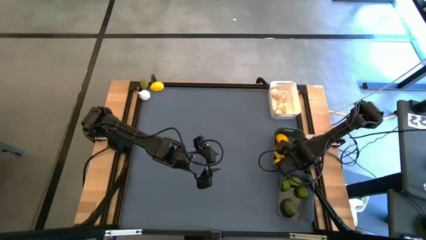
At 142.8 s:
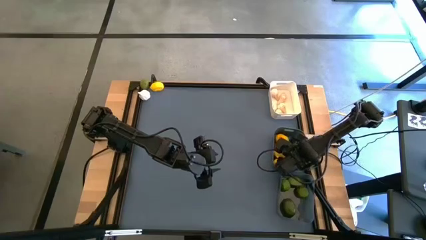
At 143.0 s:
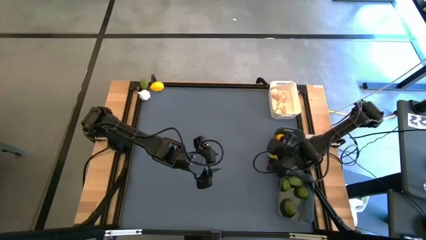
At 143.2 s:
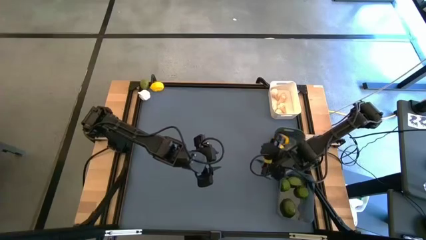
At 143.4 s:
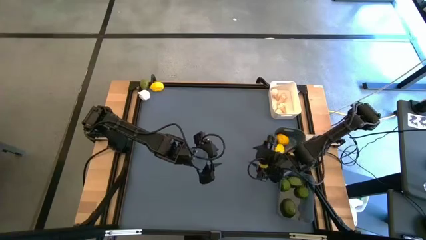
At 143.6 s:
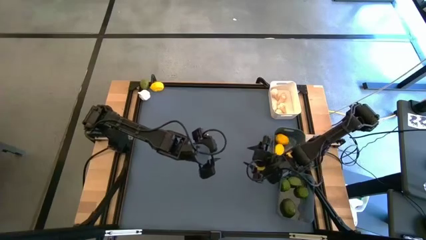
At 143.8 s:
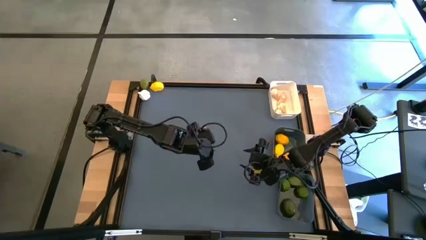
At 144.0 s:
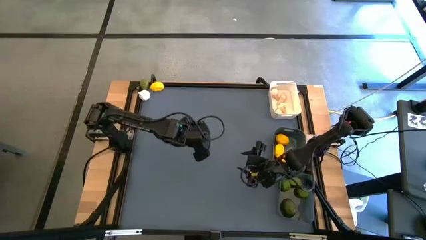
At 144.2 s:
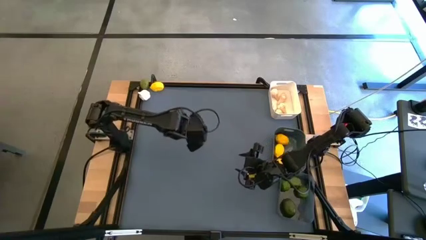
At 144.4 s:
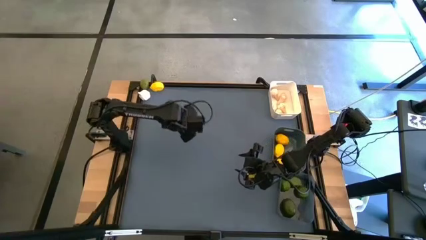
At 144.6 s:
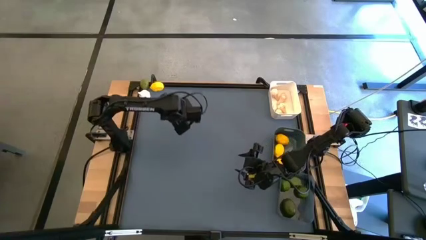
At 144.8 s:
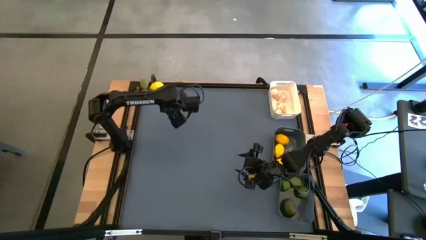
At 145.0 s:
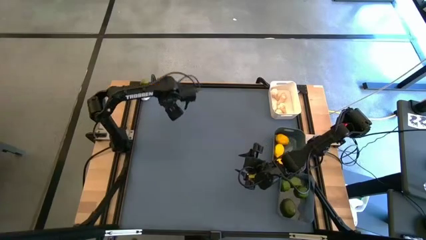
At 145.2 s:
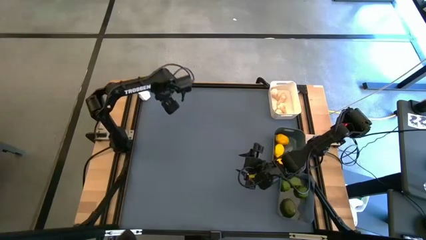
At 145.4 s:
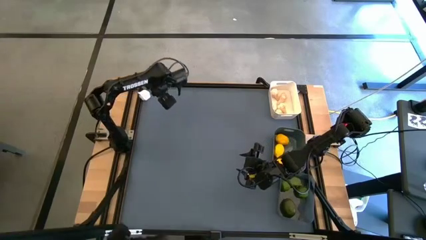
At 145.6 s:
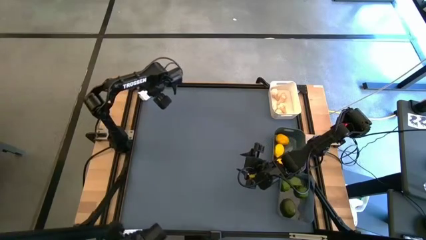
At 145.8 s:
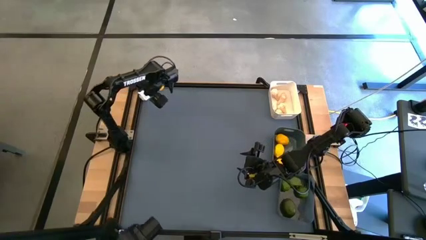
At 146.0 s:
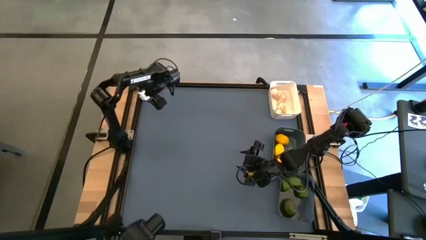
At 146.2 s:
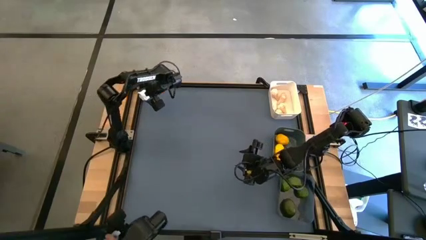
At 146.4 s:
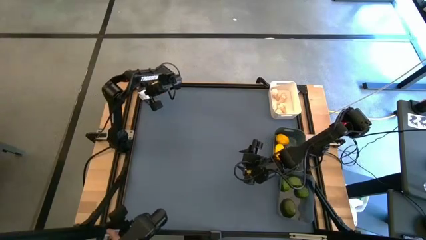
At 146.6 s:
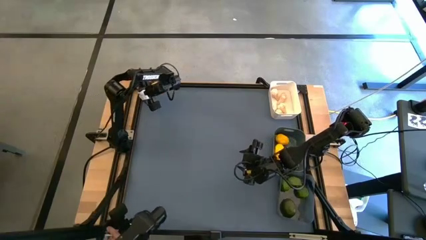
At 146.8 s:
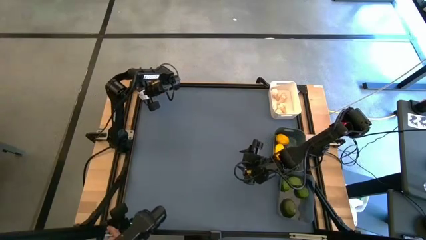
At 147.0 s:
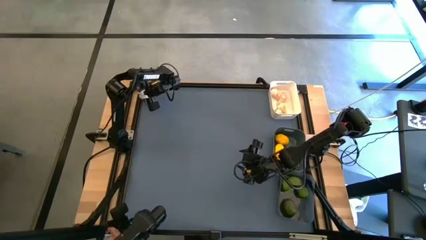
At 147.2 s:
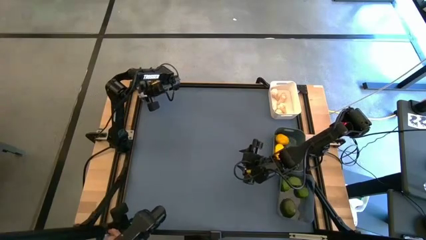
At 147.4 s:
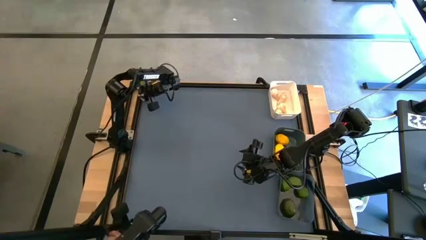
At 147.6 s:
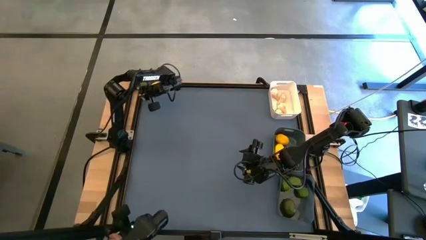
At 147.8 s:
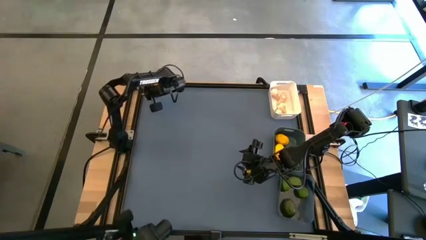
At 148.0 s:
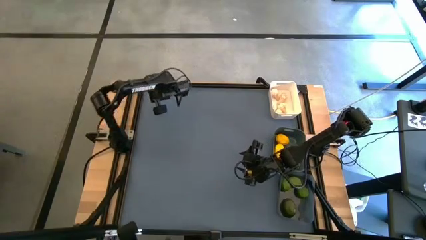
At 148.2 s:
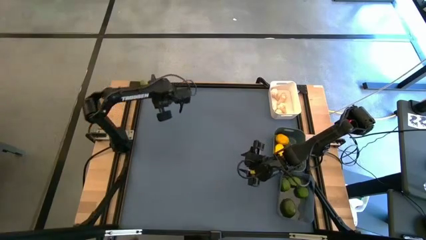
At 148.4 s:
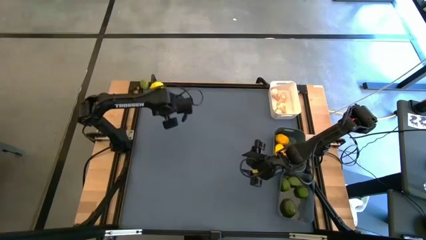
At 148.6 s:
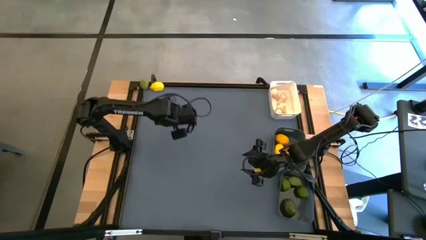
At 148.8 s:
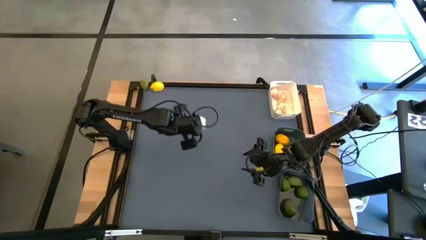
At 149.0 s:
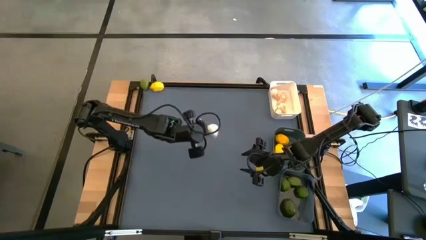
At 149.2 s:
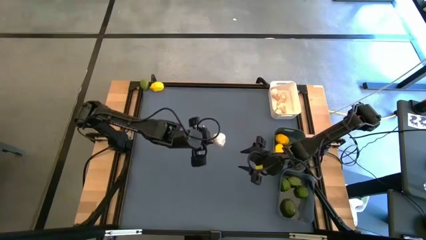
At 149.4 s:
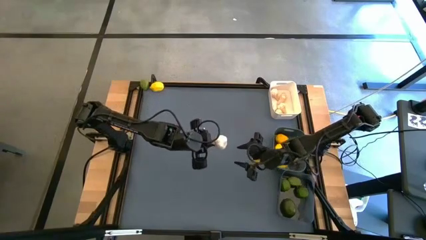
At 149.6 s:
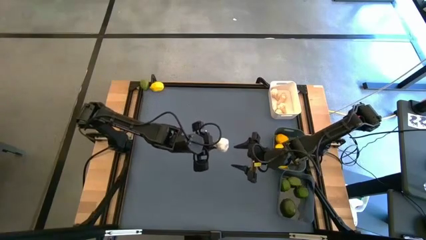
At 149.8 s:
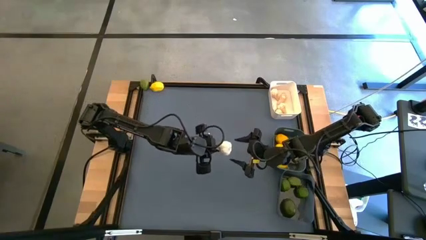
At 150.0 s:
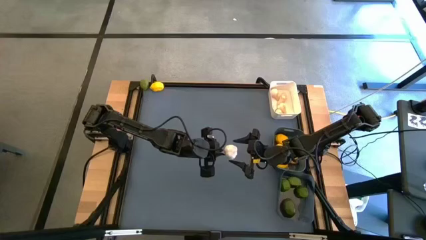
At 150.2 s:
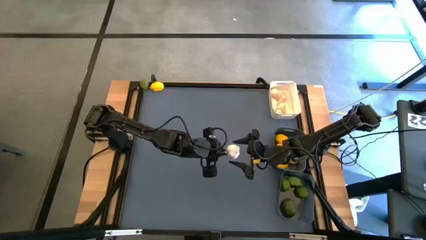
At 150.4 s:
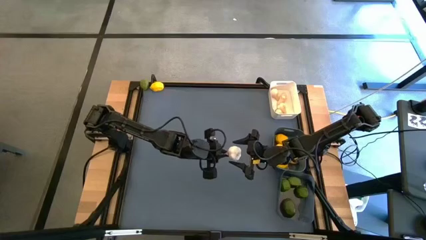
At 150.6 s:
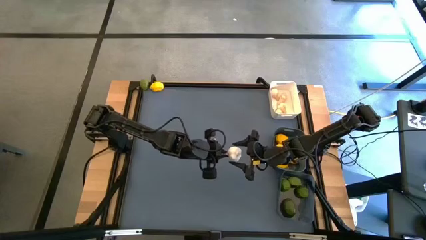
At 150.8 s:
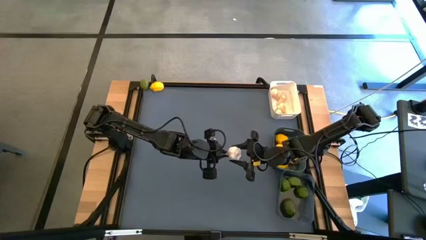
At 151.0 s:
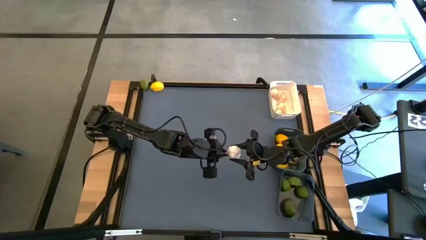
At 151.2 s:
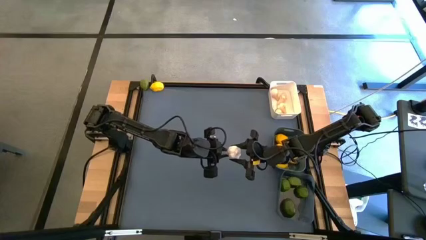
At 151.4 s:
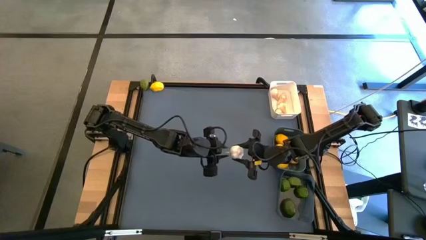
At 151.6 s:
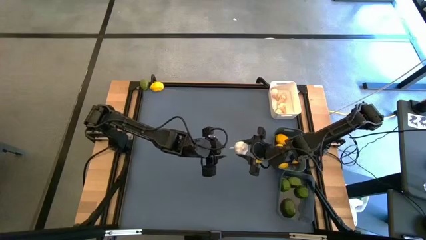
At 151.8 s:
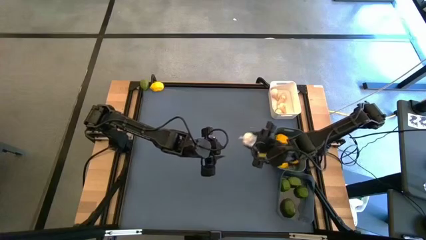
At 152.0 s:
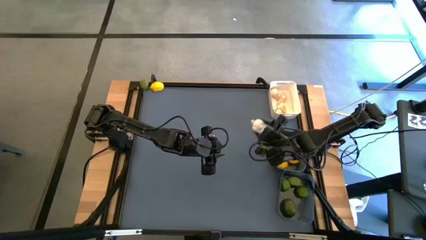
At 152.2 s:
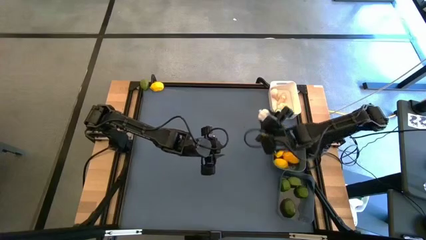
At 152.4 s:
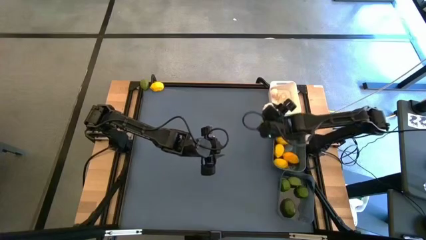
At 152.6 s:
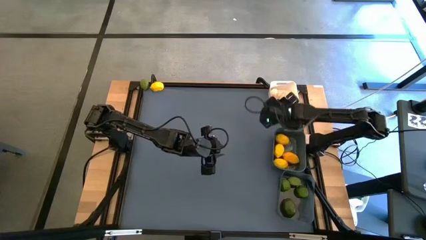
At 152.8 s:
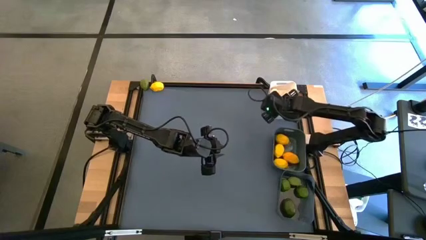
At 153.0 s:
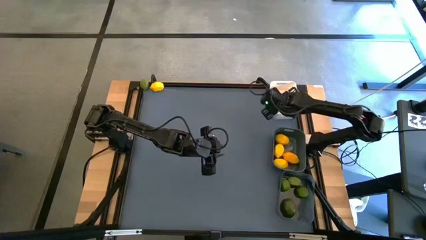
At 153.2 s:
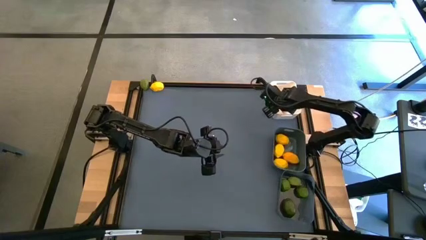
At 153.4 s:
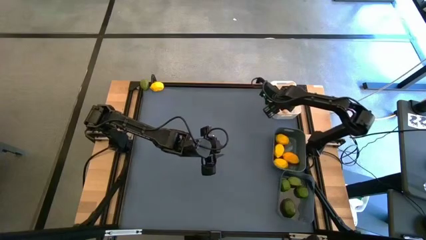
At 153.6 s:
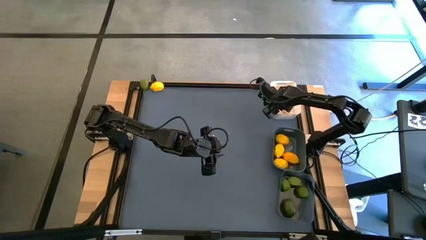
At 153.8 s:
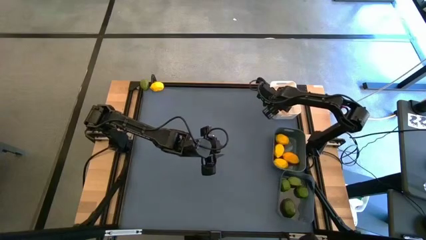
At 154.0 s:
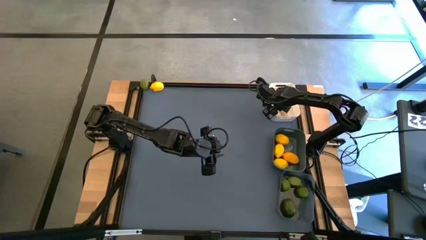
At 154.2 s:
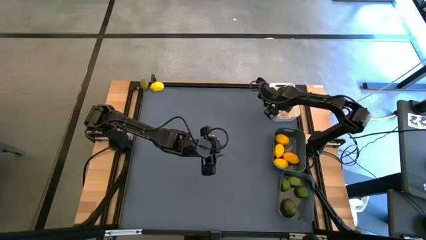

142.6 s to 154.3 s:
Task: Sort produce into baskets
Put the white garlic into the white bin

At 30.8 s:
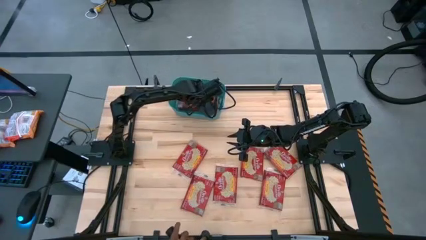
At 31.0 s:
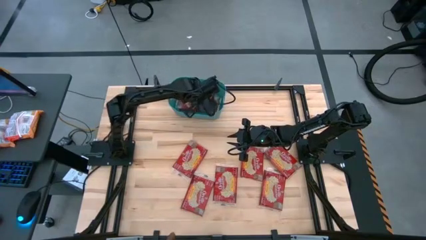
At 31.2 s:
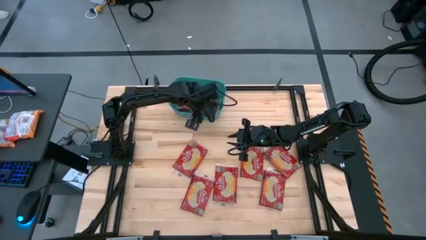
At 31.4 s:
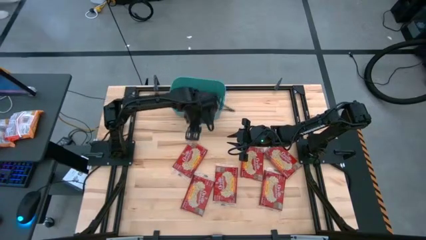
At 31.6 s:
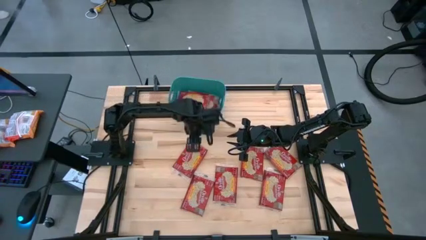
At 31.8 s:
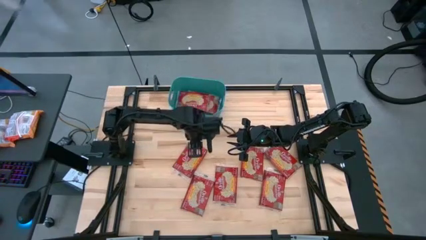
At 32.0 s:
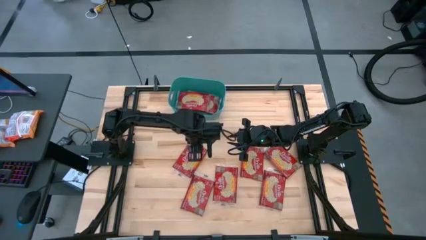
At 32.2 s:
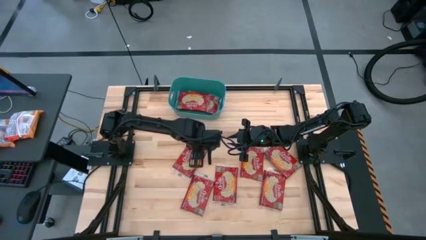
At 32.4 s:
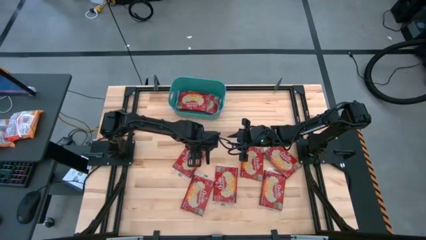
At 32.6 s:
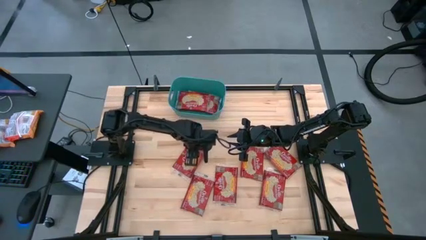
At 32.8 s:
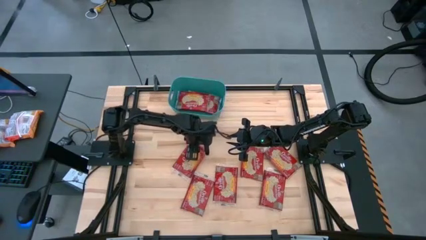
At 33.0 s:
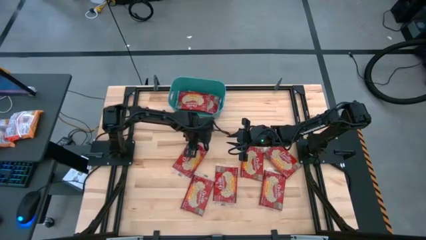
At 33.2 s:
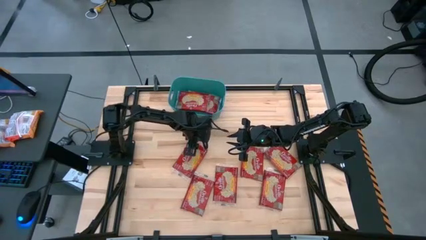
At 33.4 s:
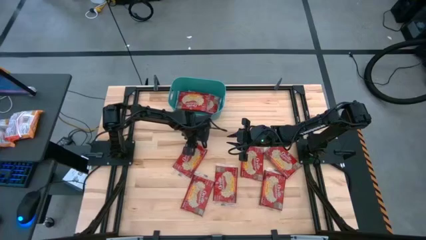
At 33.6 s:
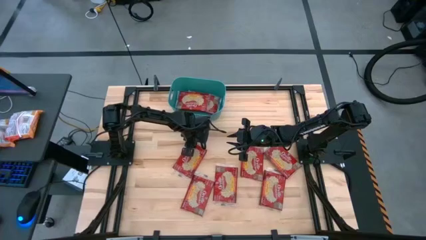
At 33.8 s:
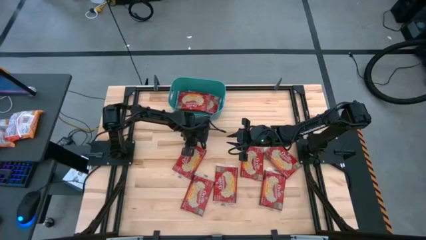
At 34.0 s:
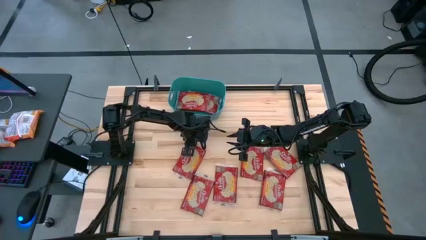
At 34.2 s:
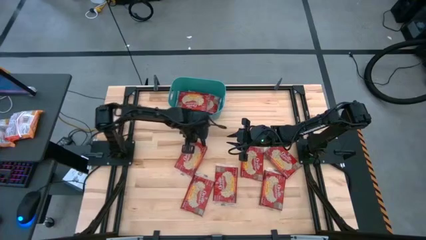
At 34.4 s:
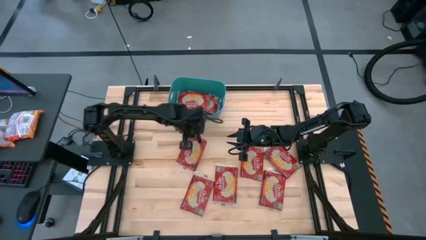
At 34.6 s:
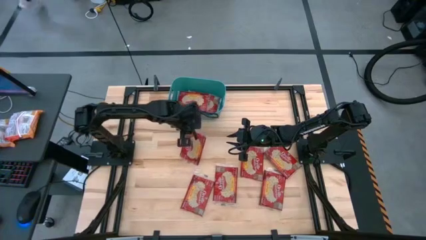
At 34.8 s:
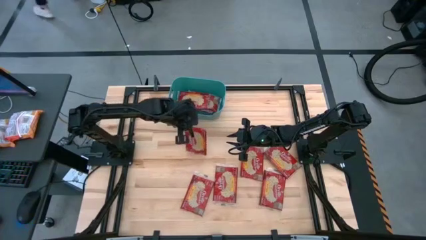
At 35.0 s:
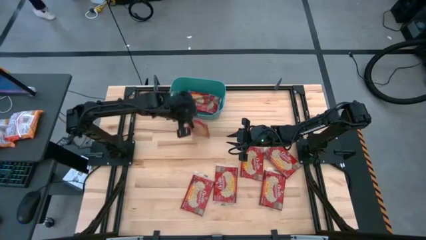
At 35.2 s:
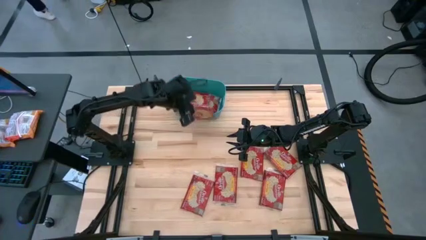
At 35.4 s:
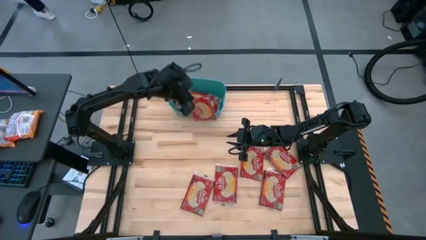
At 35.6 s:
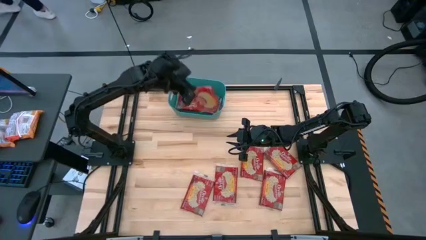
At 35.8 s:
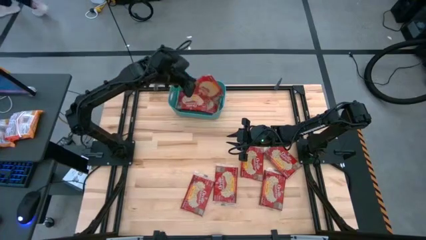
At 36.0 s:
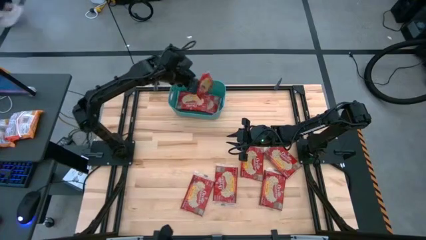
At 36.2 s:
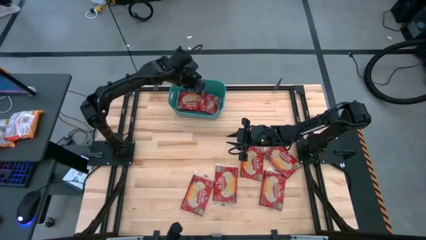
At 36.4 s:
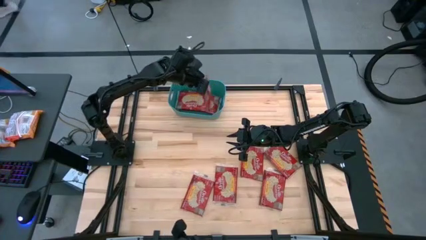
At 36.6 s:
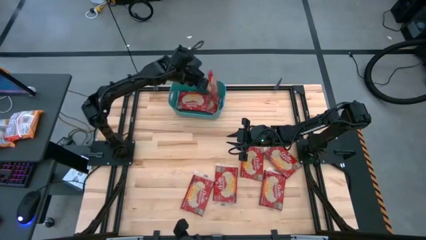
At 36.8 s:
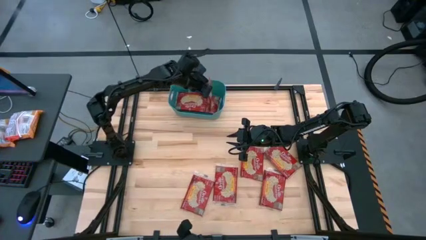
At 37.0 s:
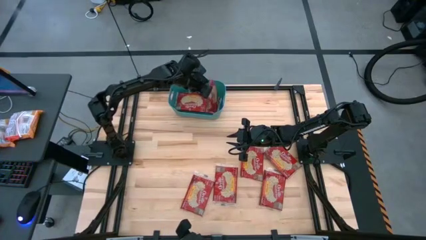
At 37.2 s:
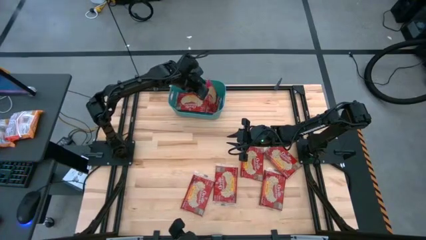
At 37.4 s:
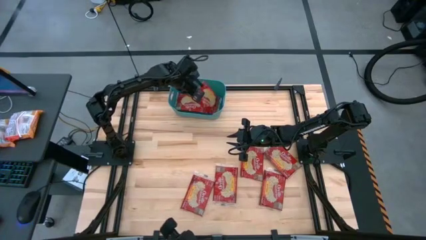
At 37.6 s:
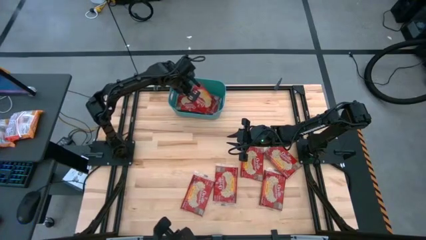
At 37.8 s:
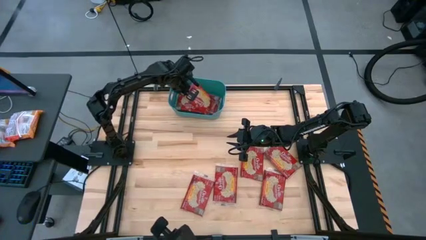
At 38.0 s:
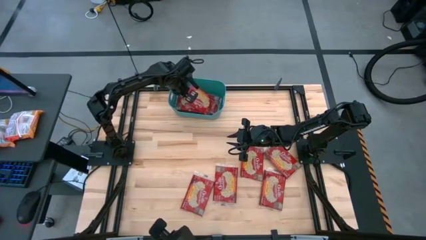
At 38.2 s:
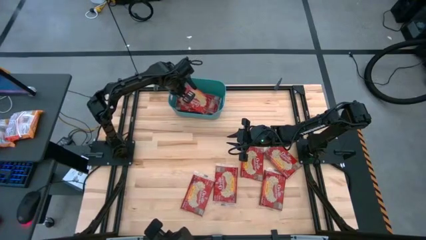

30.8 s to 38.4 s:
Task: Sort popcorn bags into baskets
Put the red popcorn bag into the green bin
